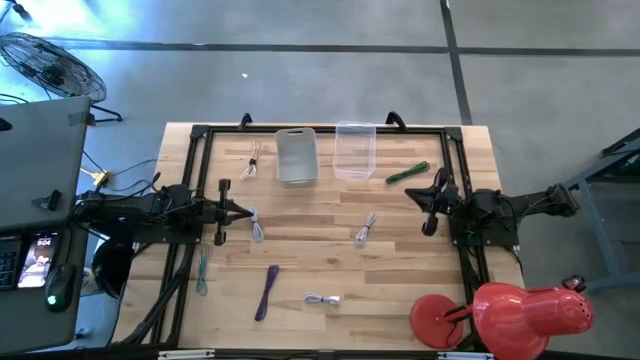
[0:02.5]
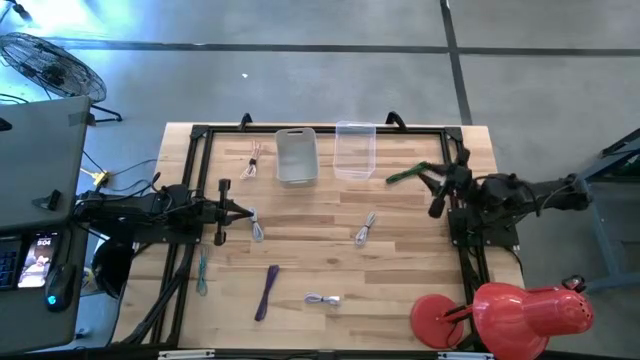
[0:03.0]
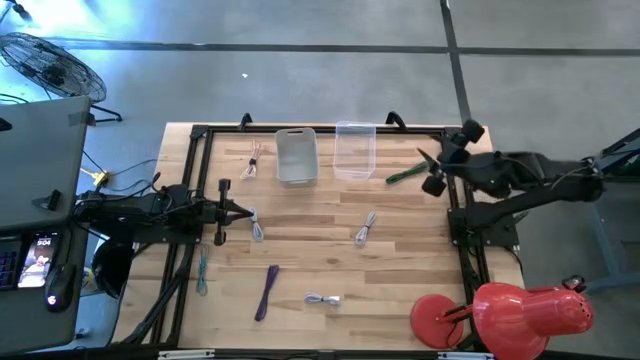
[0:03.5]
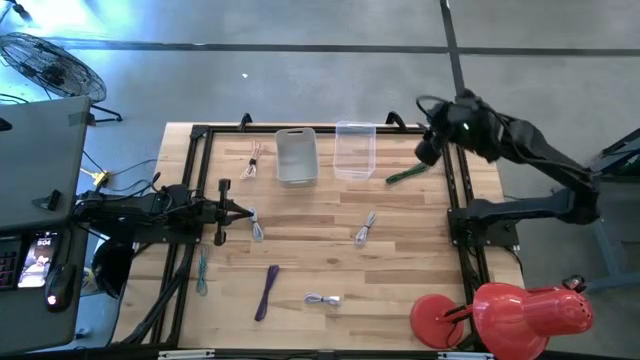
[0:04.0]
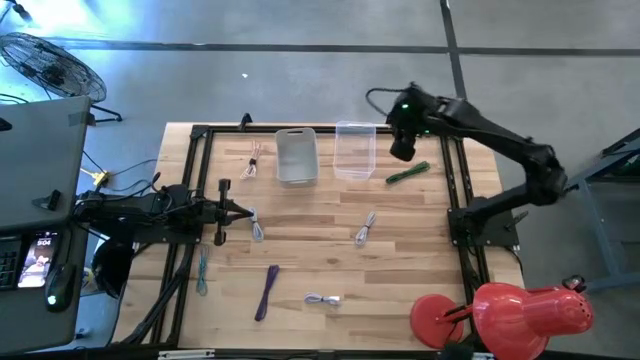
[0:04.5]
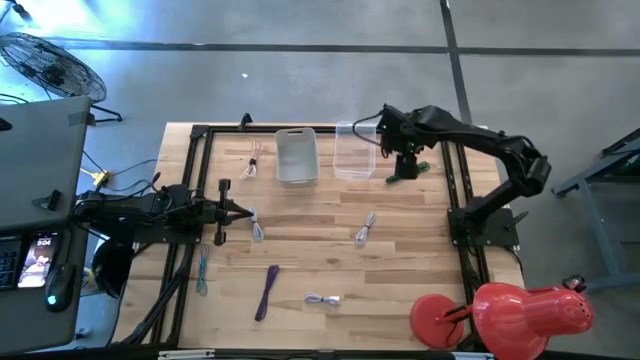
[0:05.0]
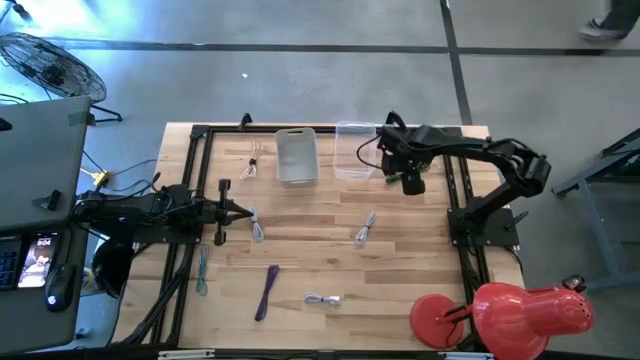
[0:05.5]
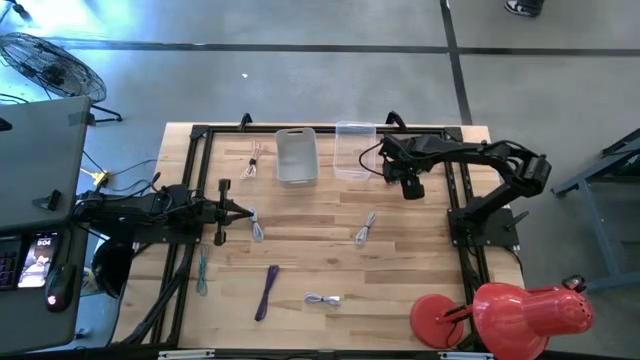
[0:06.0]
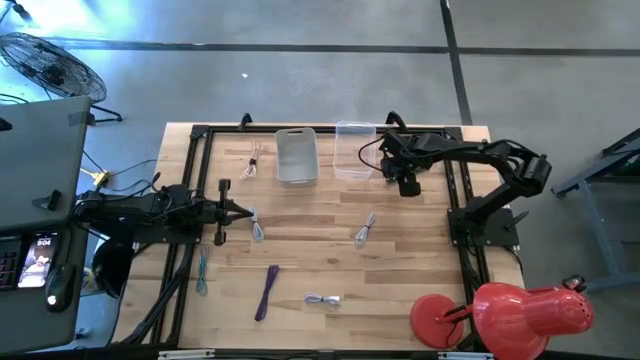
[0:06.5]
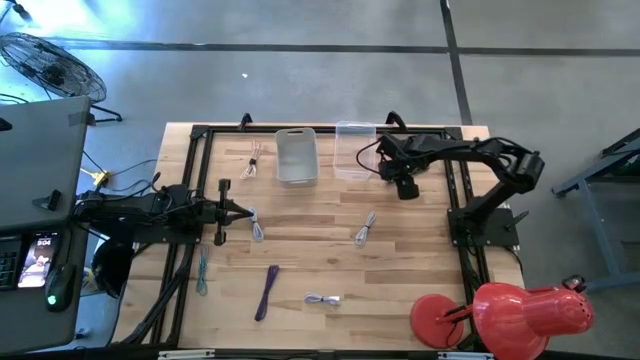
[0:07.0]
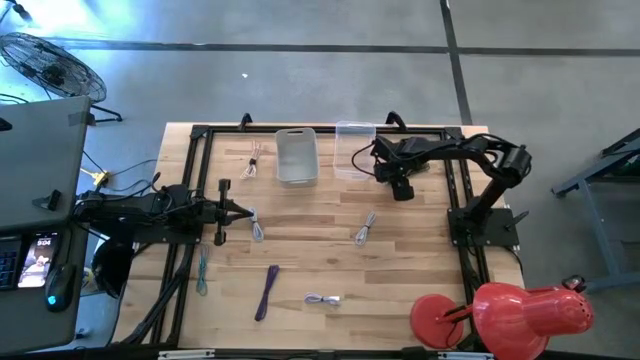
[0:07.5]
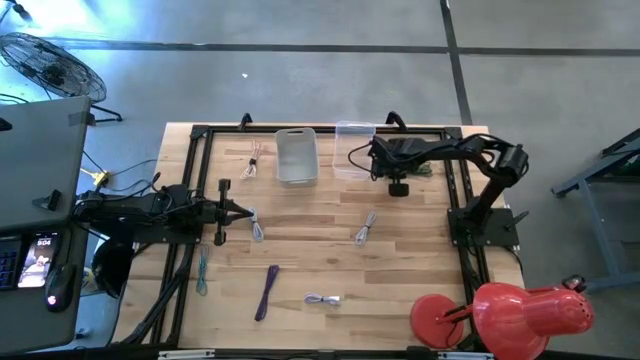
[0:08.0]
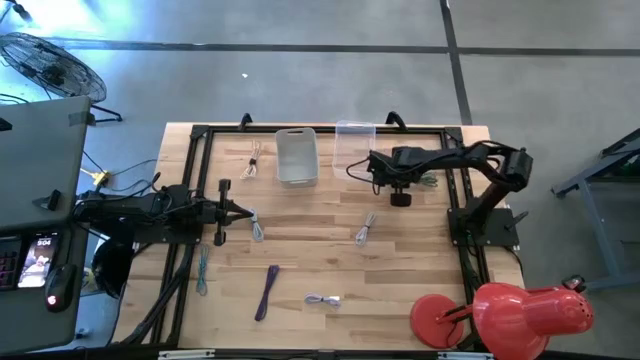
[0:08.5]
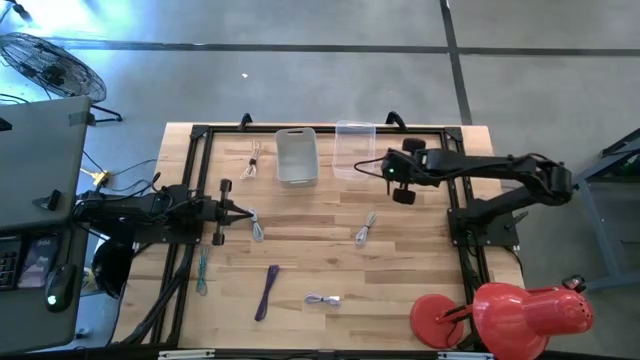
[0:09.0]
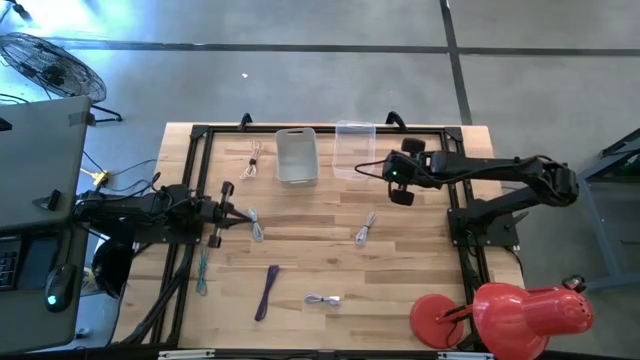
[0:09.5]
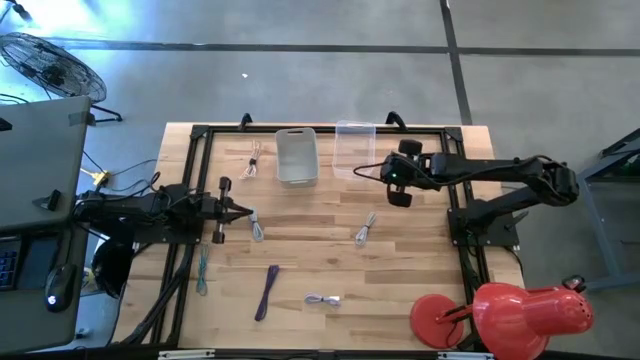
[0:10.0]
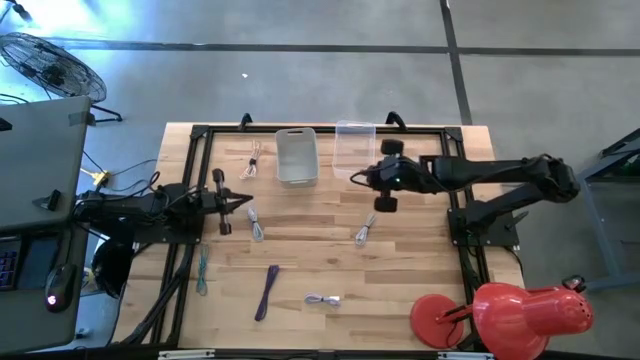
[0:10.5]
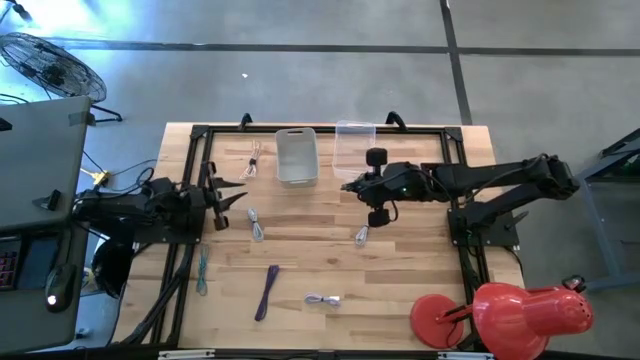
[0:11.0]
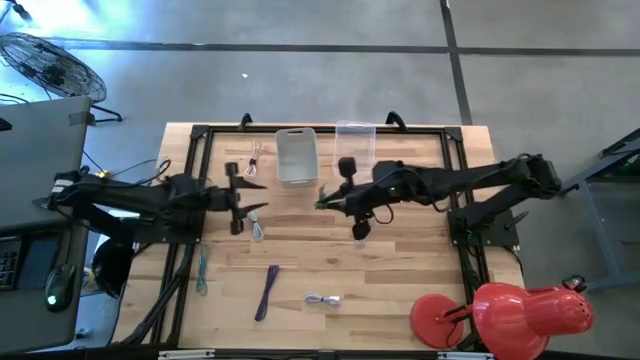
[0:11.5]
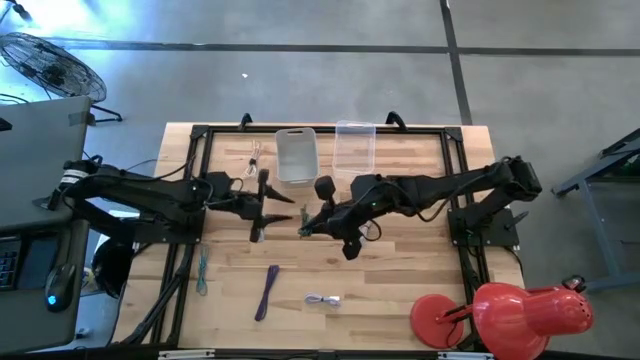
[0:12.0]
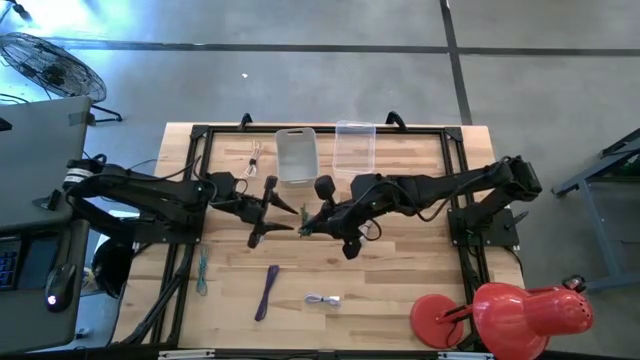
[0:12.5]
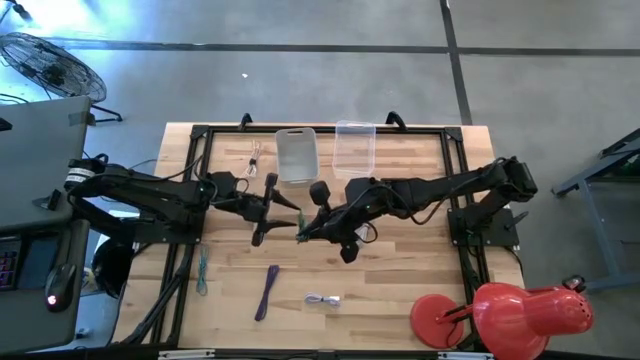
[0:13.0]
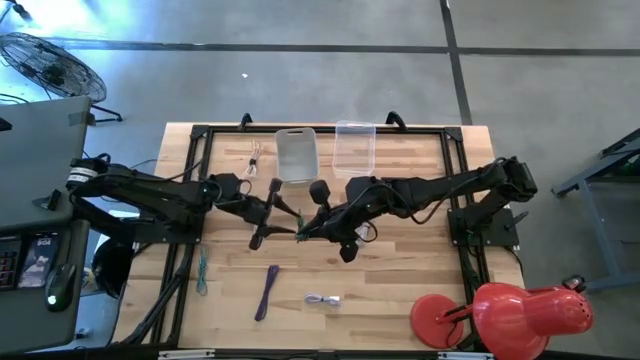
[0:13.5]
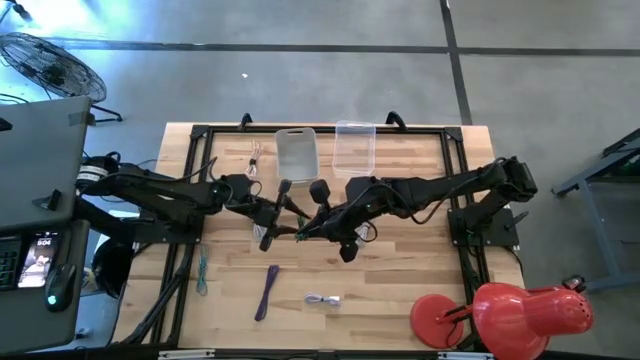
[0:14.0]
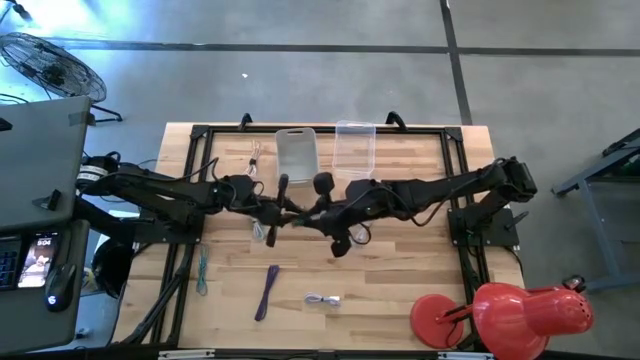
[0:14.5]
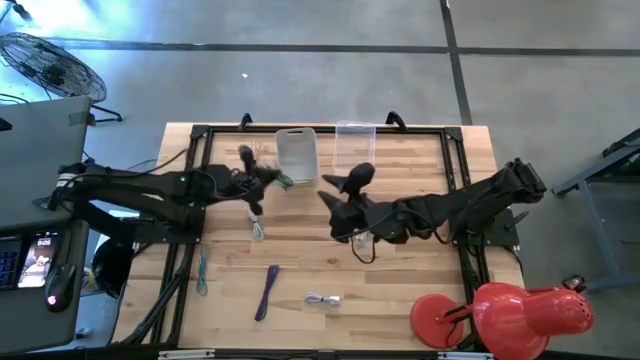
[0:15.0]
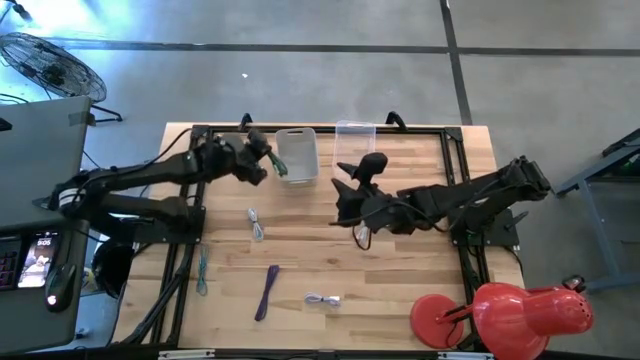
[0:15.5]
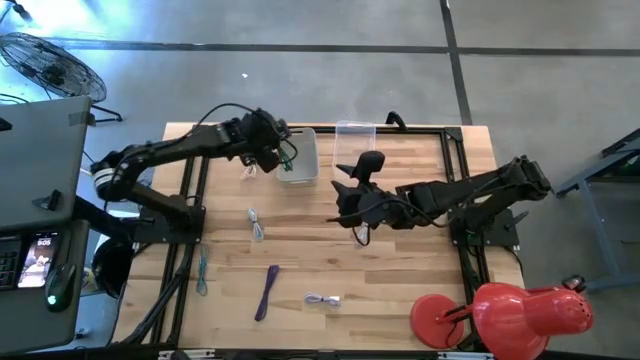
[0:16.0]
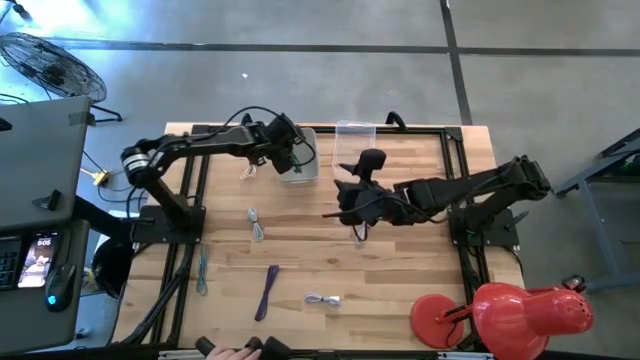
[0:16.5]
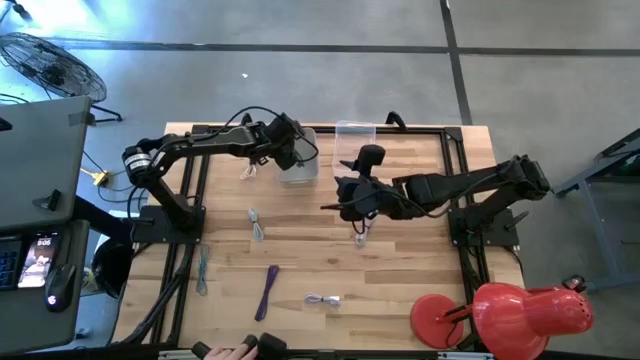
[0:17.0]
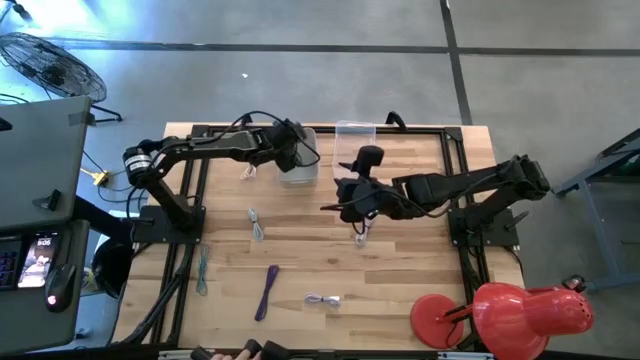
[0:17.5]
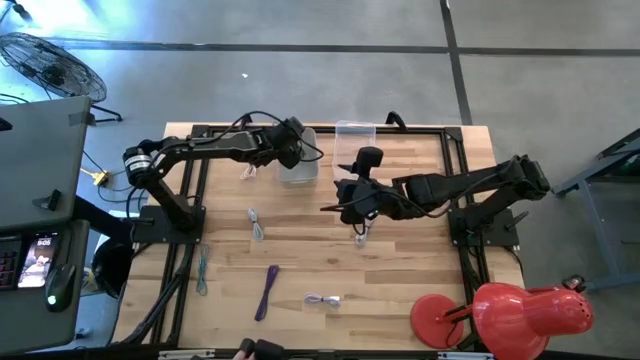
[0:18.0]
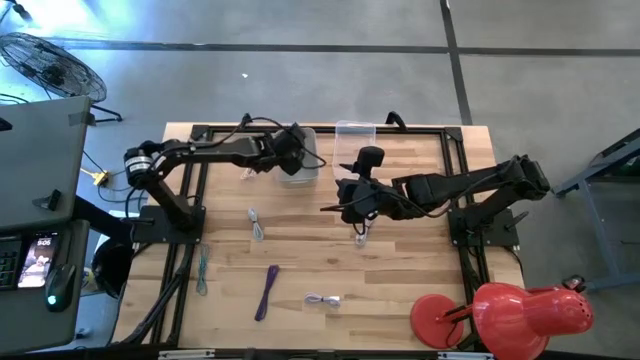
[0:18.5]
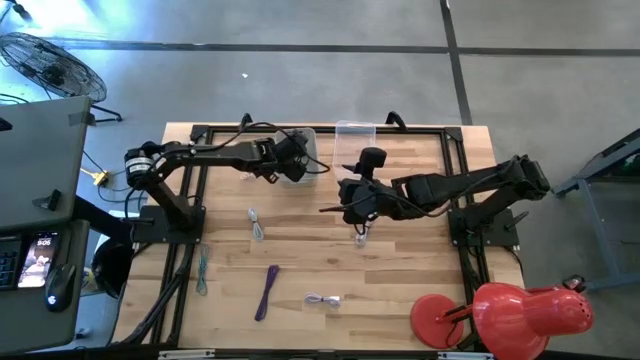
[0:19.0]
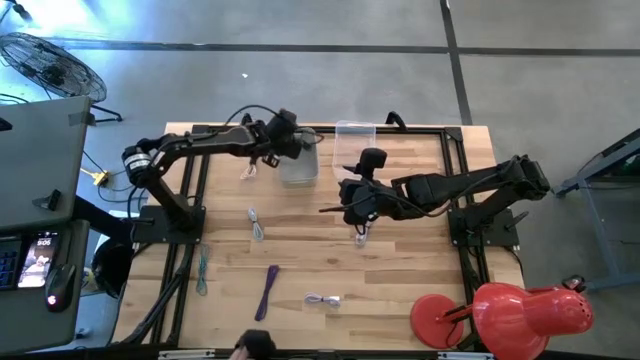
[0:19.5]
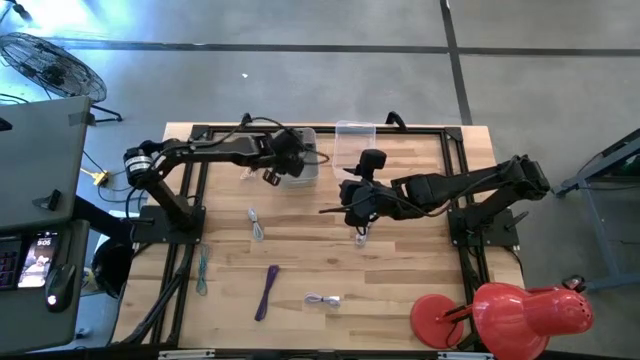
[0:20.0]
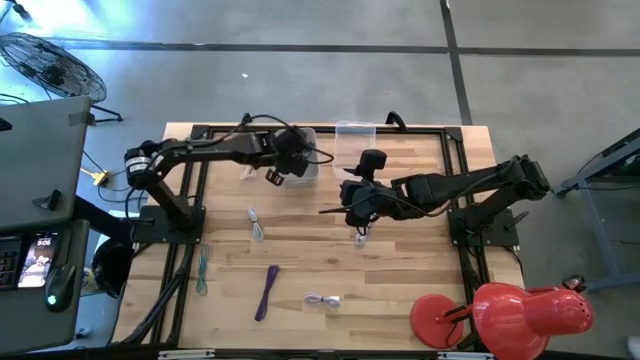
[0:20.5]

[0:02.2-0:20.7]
Task: Pick & Place USB Port
Put the green charger cable into the grey bin

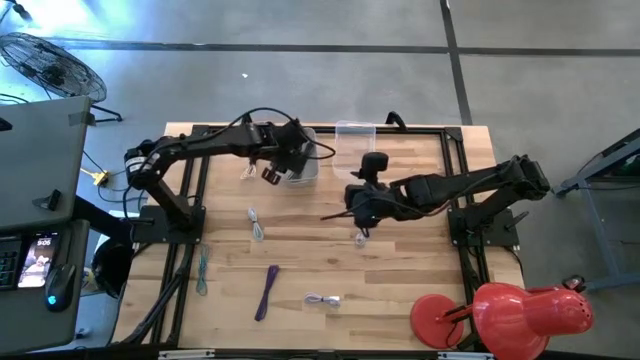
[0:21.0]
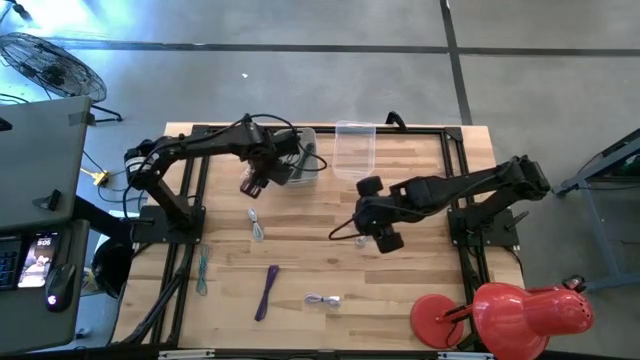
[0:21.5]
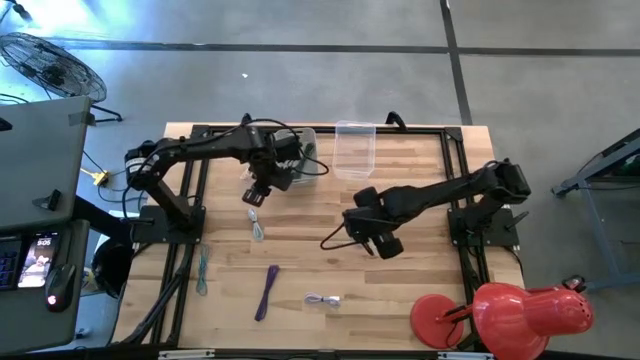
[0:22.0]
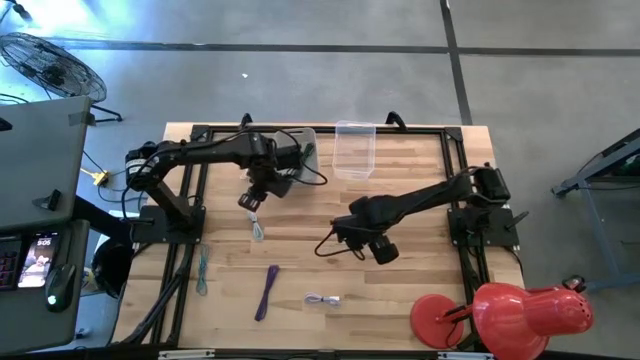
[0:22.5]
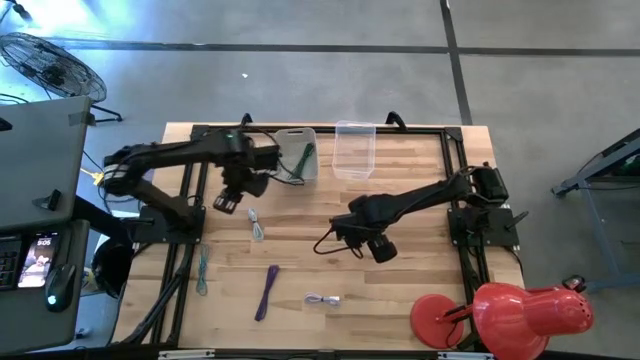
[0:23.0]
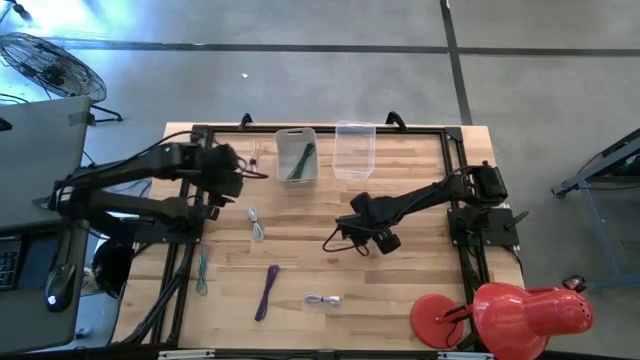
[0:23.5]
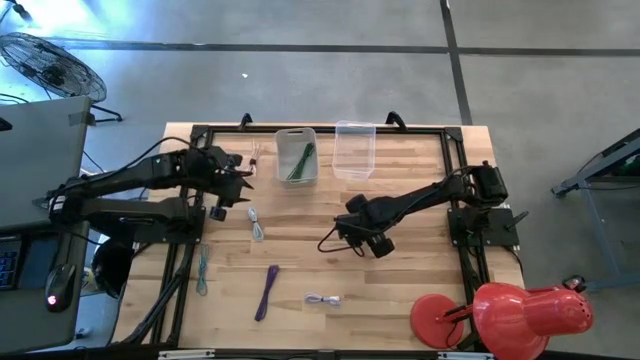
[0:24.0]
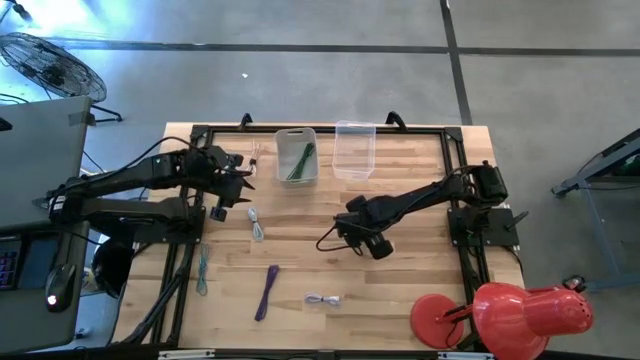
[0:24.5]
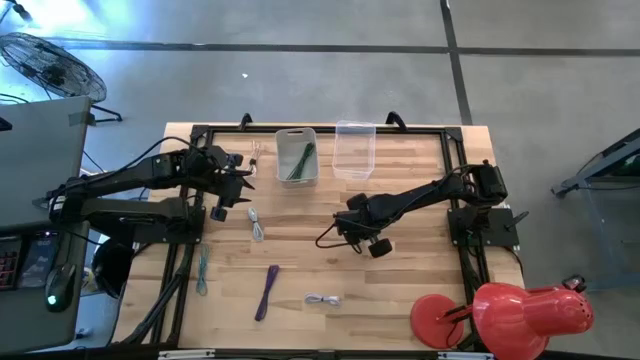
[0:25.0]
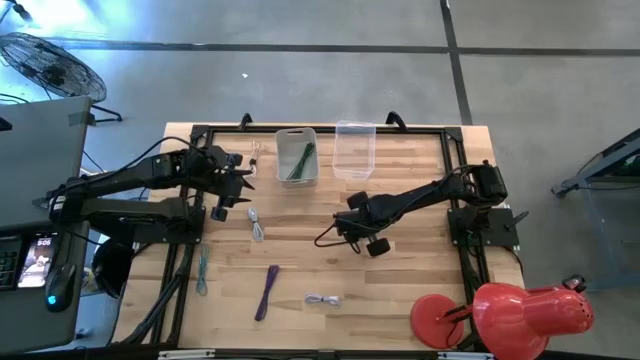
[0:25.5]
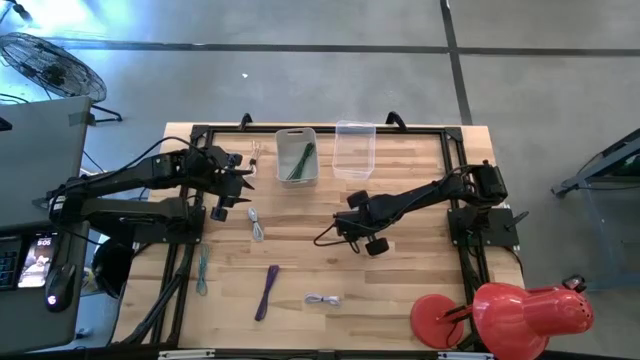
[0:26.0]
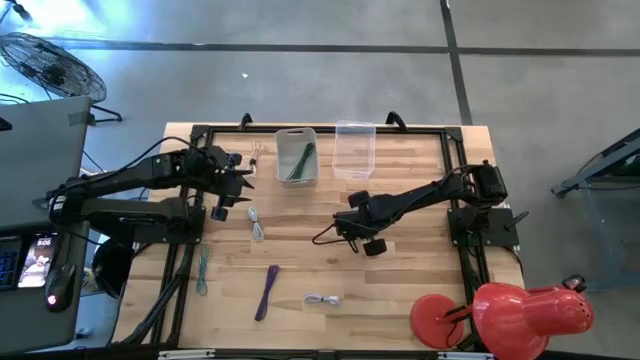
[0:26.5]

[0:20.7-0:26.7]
Put the white charger cable into the transparent bin
